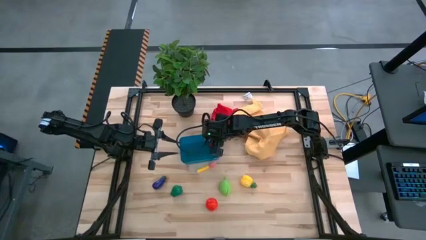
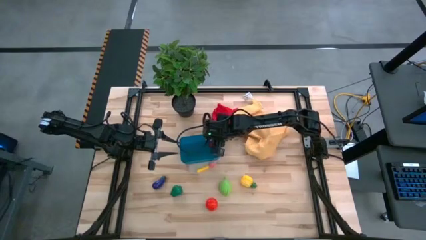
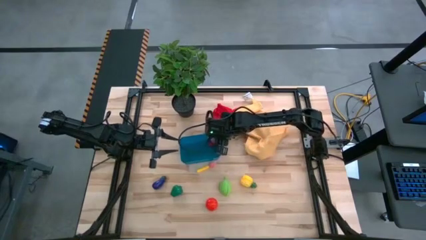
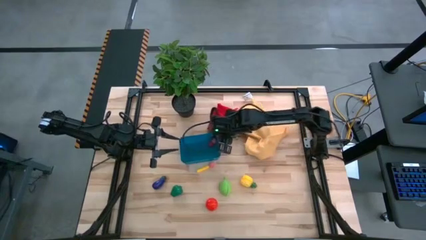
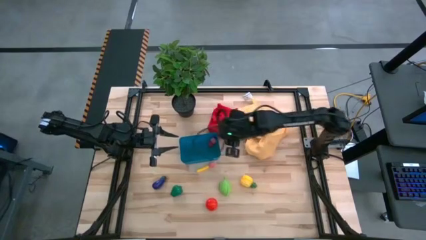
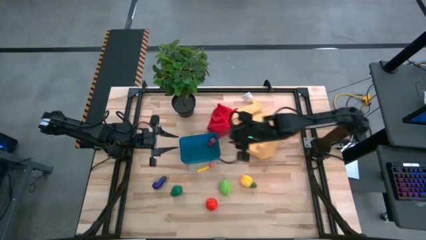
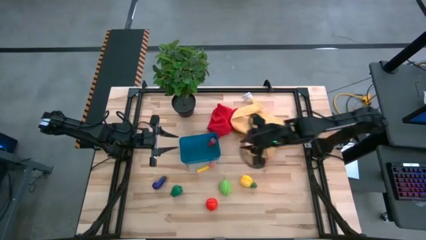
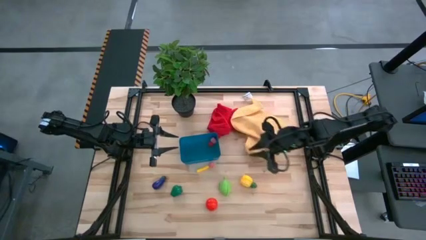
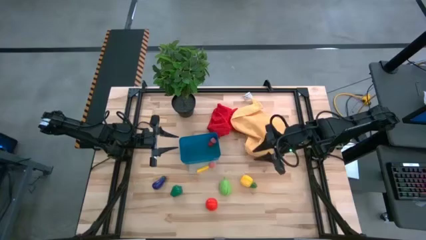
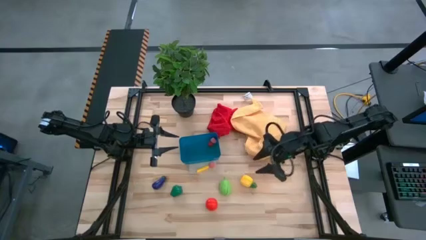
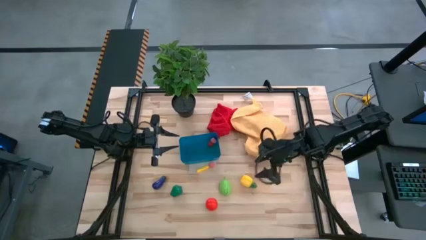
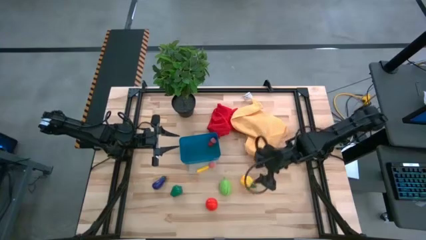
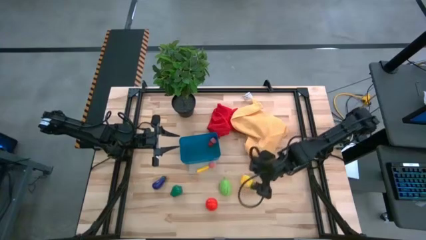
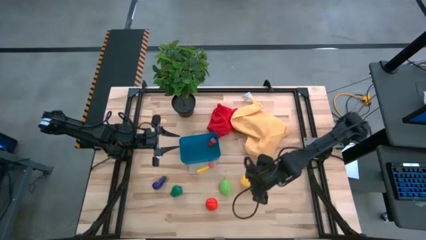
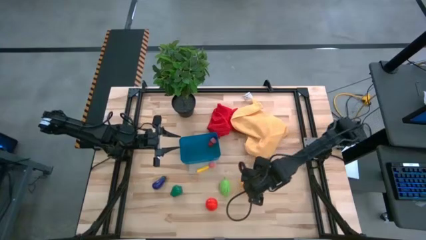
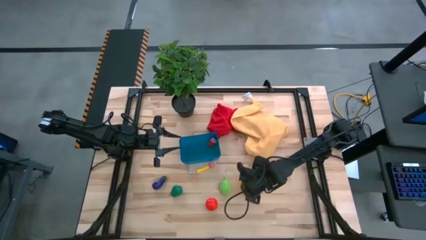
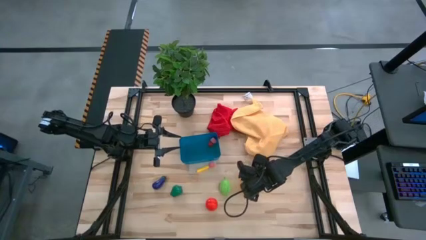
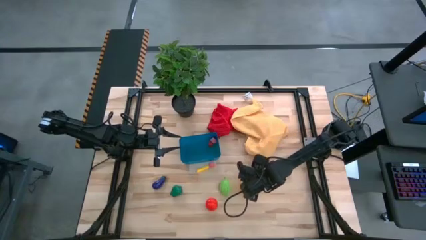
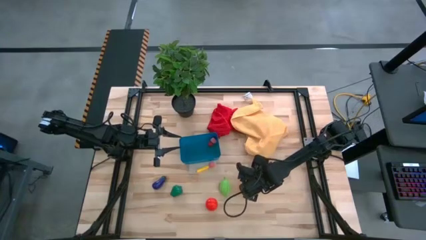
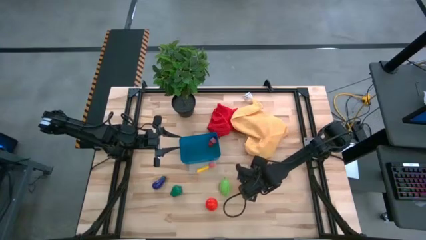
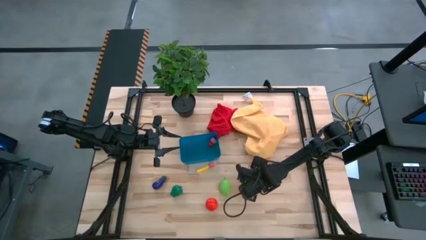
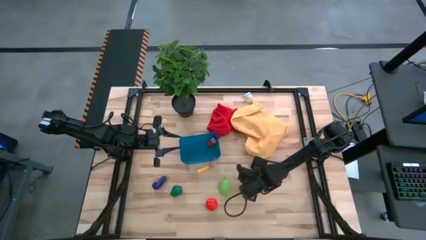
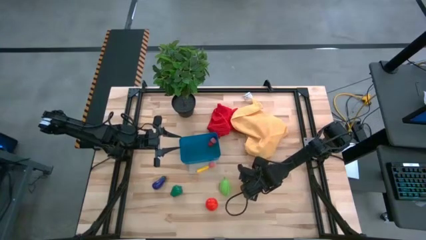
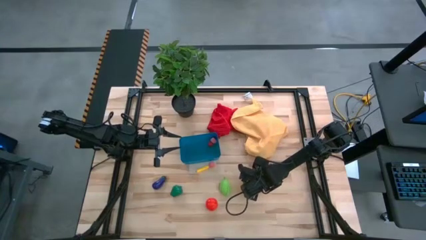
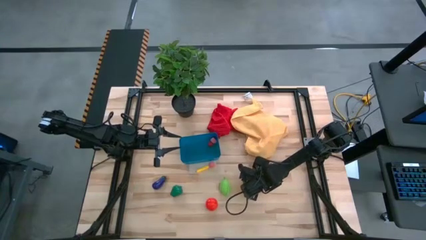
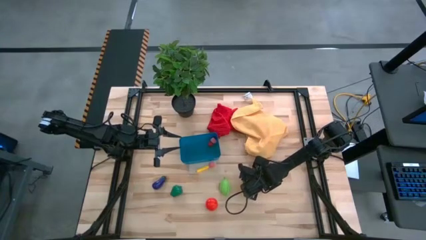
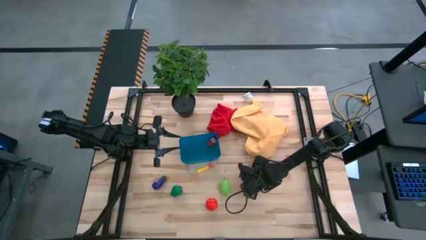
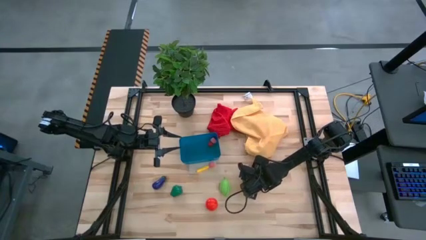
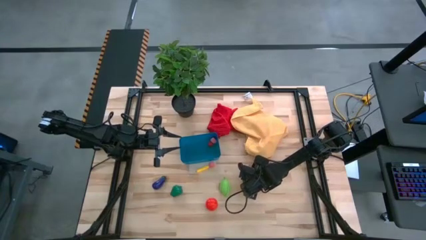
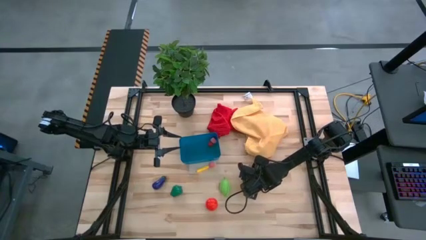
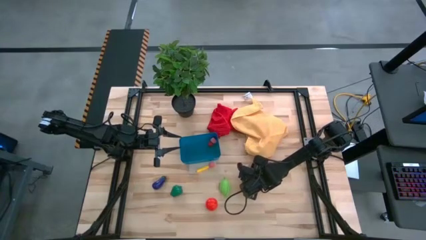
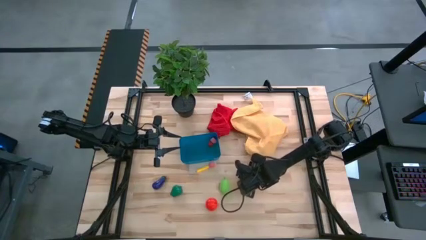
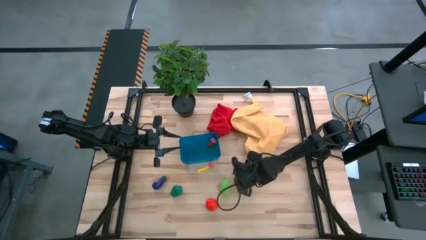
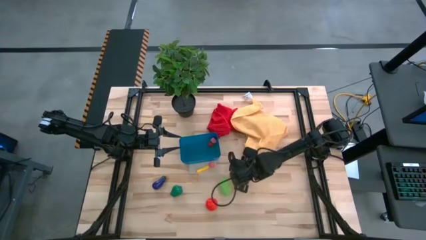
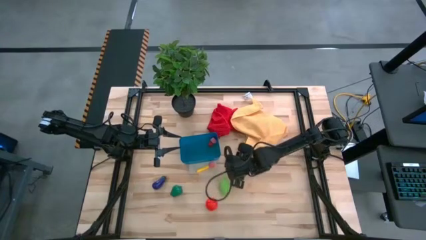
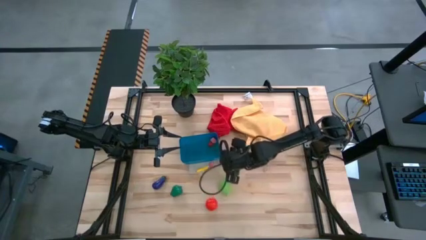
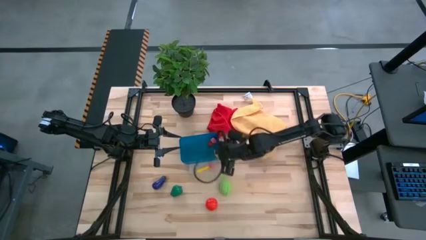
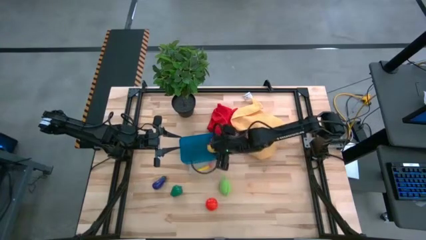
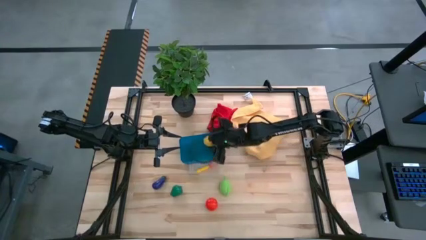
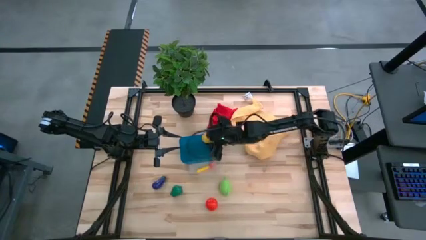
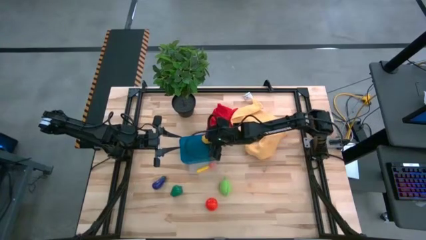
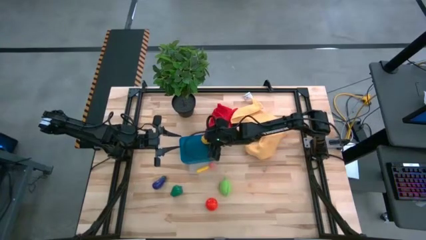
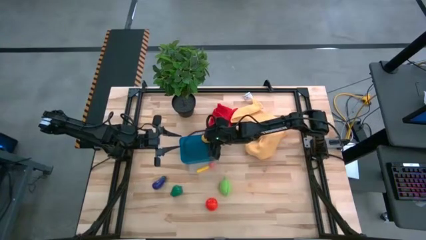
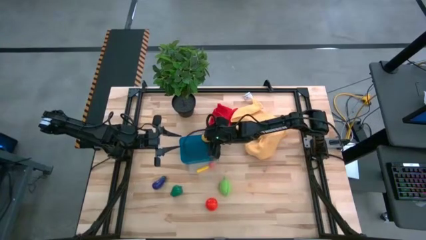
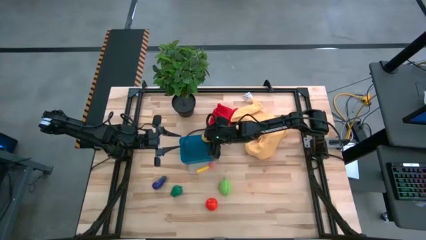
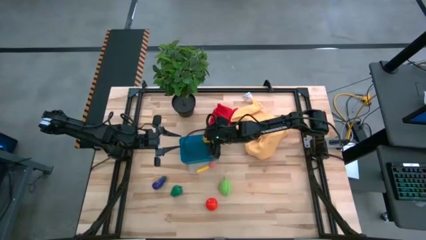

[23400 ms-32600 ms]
Task: Pick and placing Produce into tupperware
Put the yellow pineapple into the blue bin

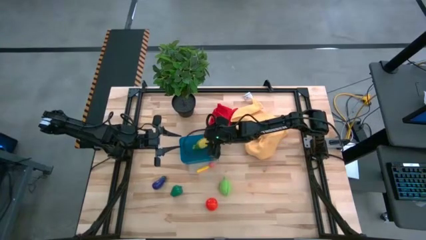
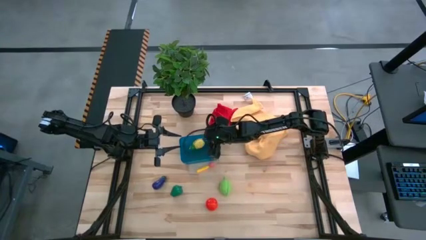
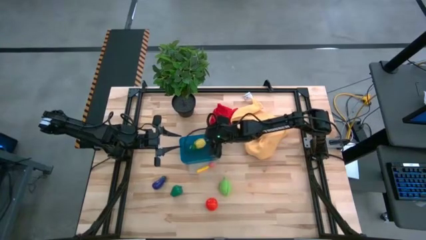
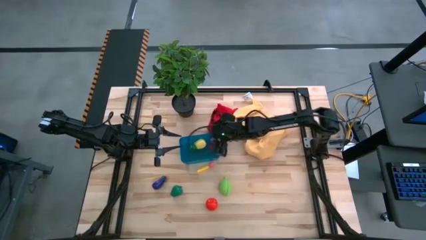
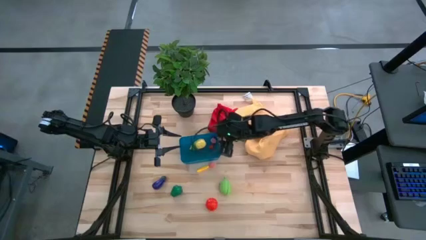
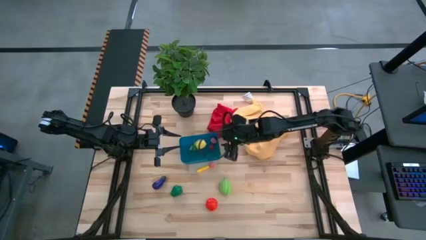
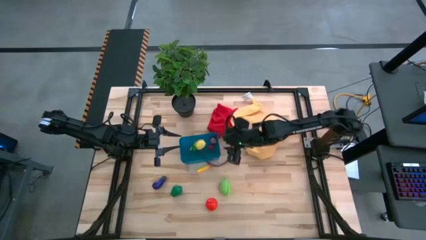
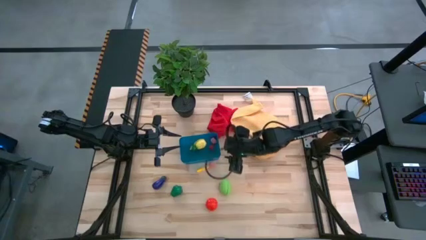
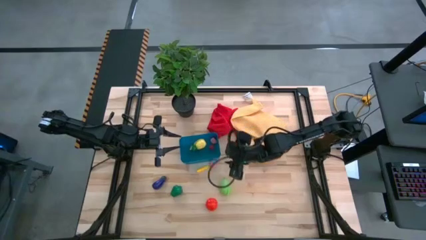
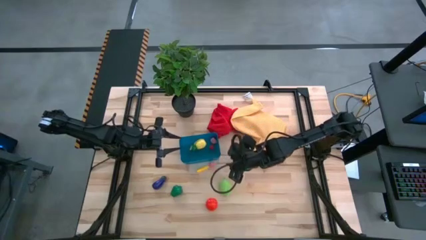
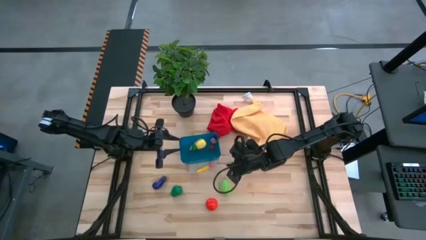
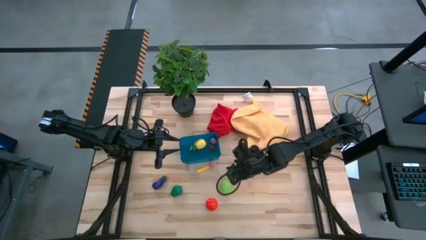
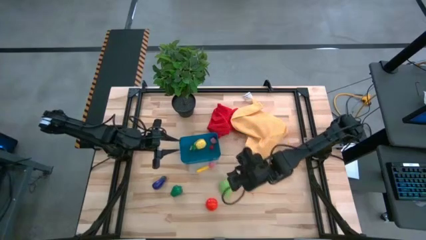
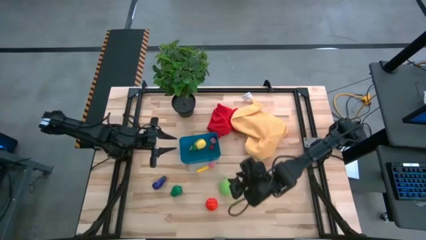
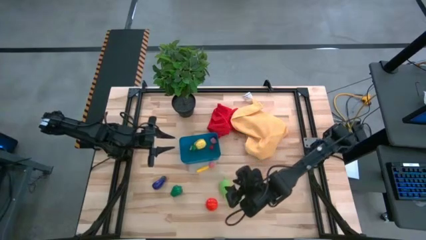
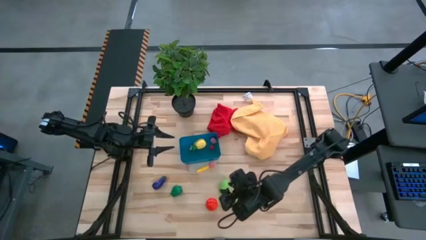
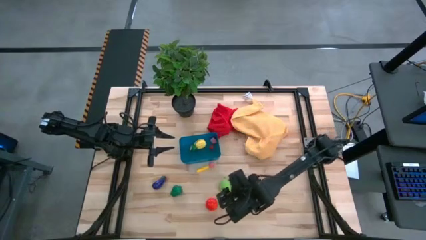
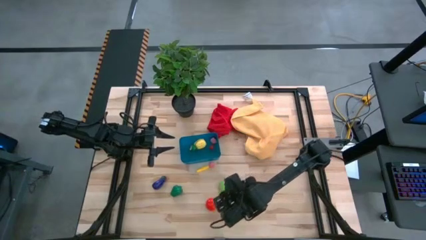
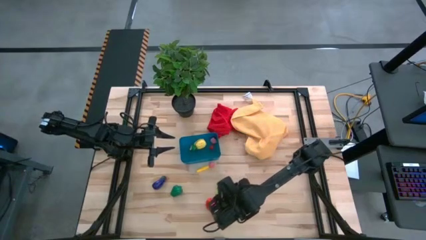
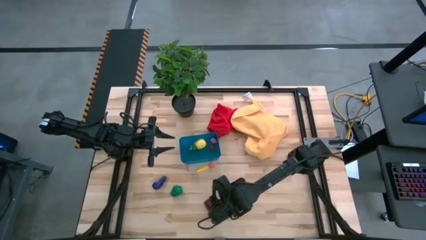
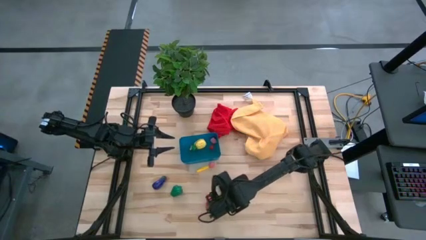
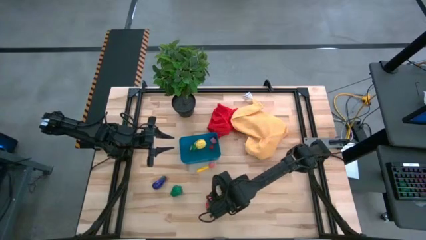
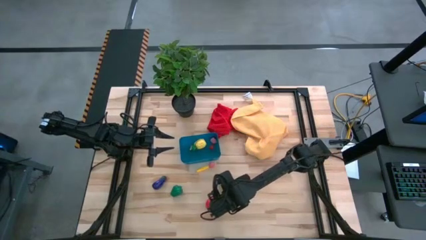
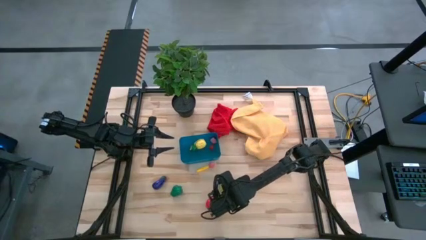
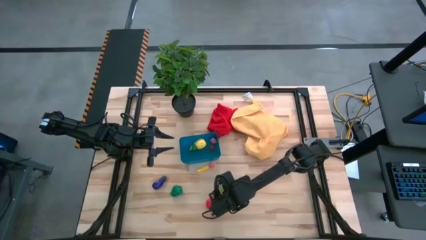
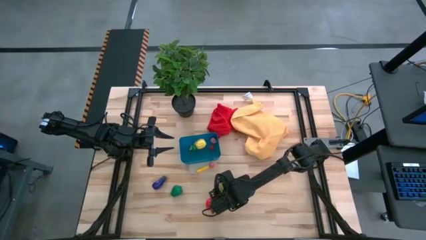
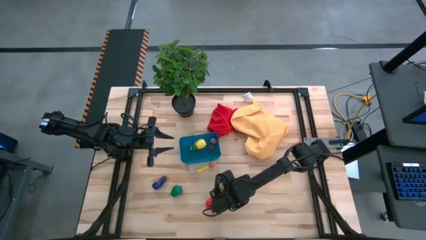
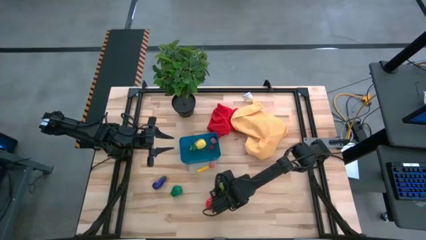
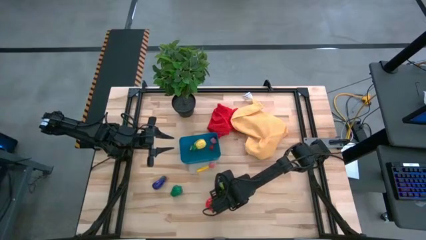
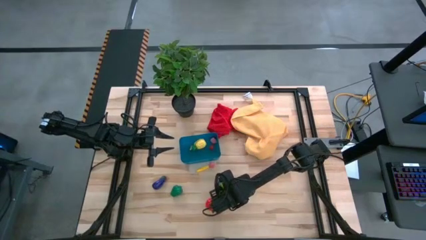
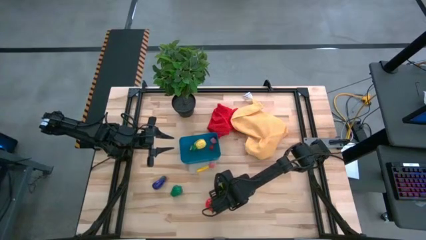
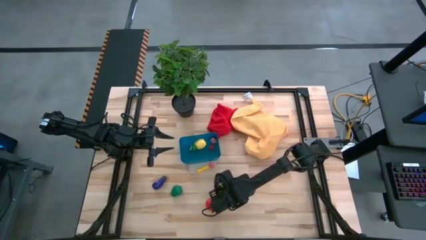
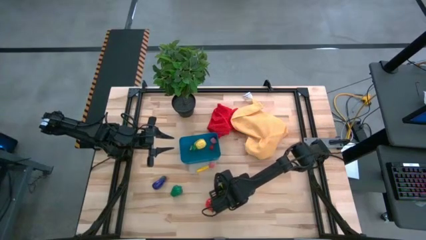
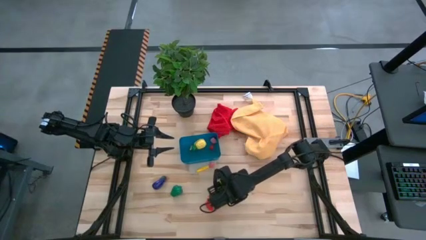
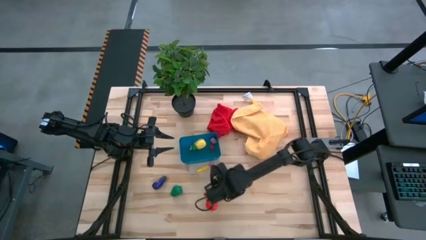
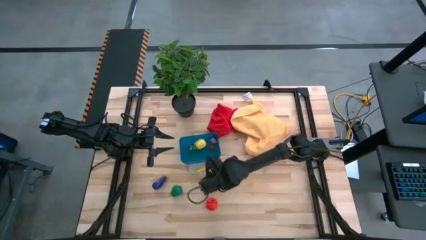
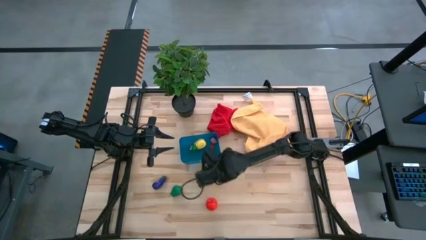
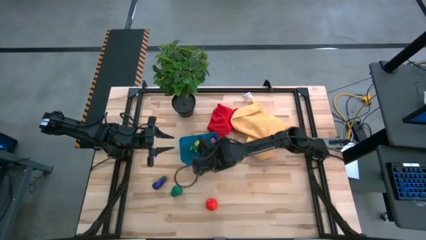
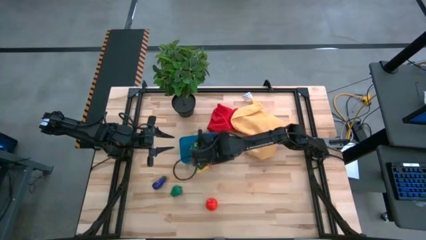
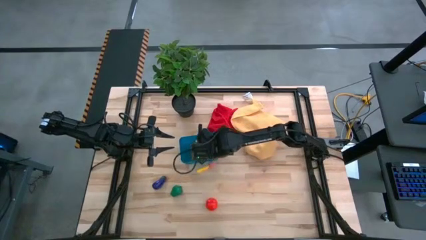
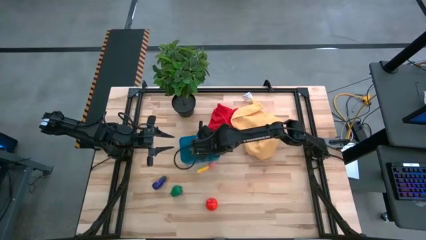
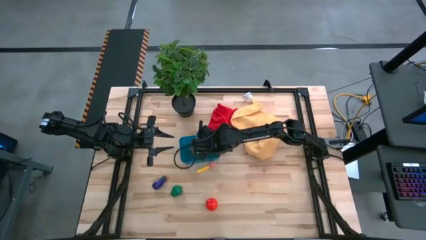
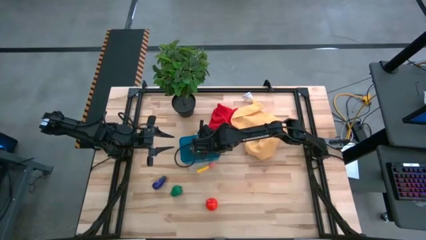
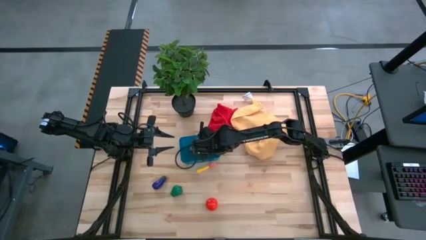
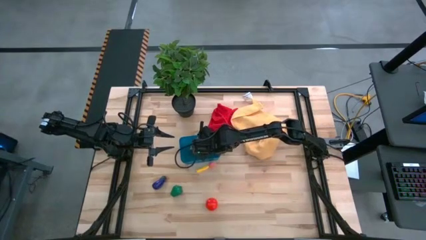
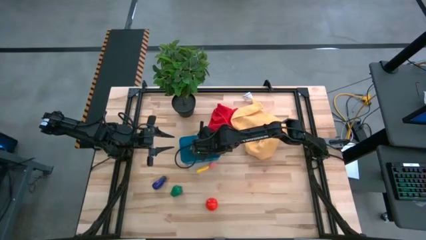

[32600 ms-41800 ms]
Put the green melon into the blue bin
